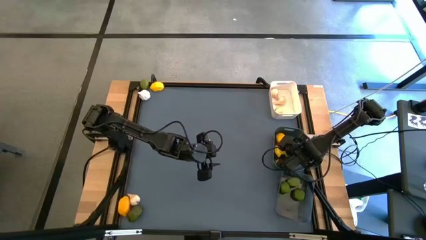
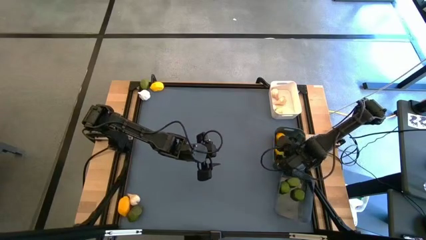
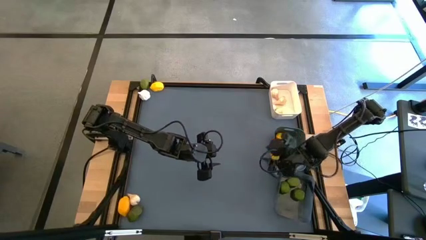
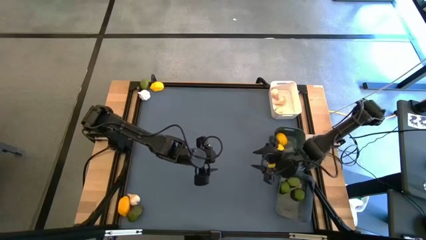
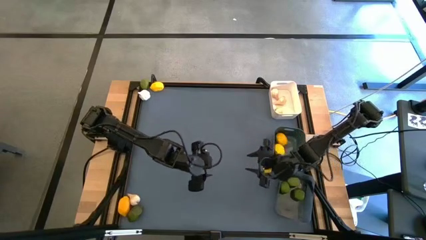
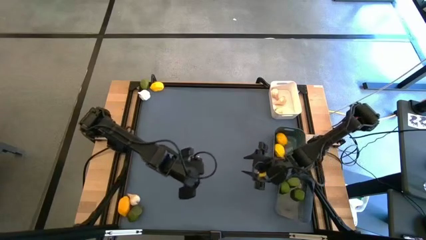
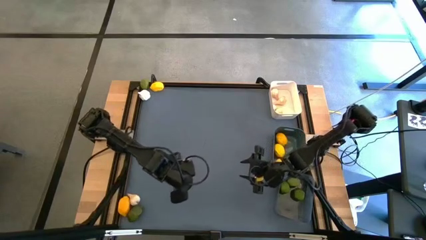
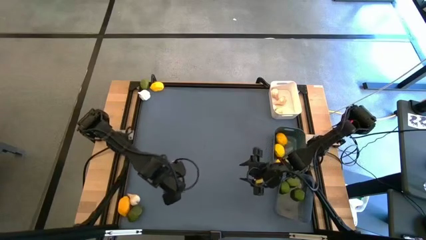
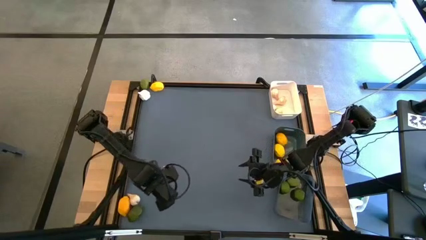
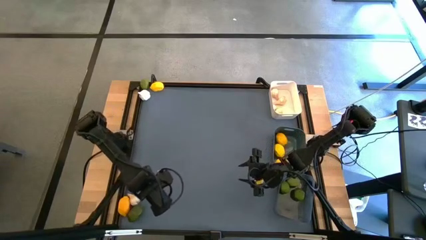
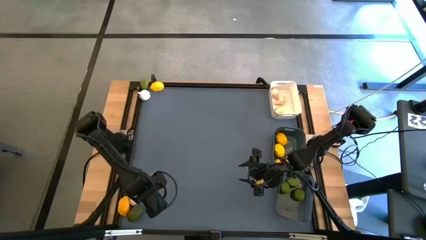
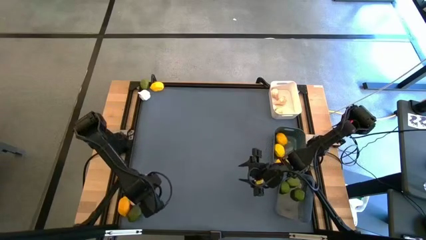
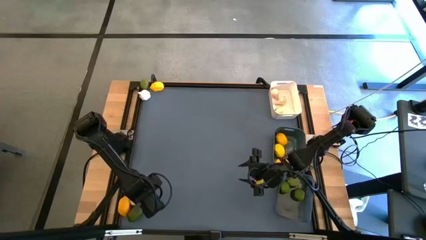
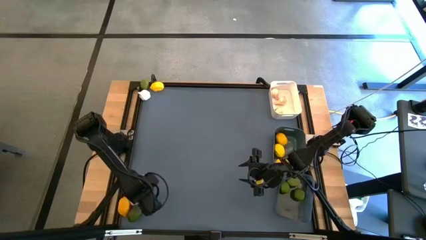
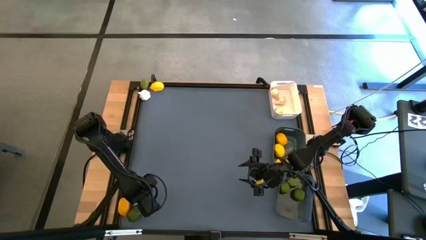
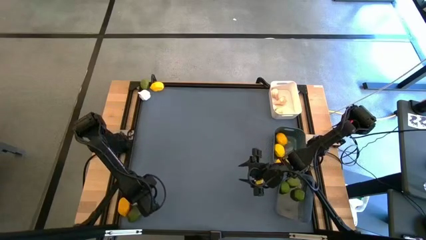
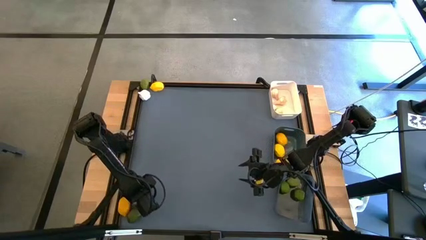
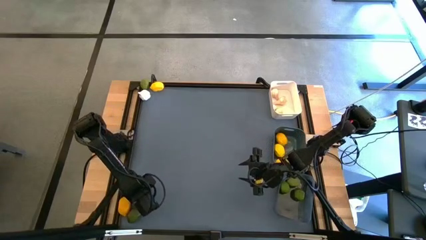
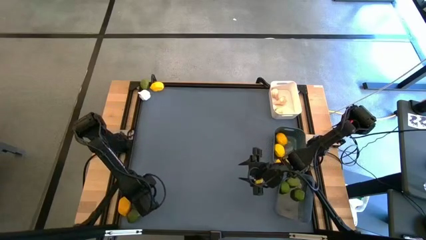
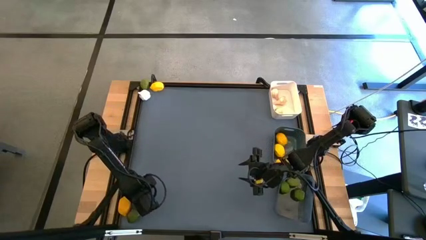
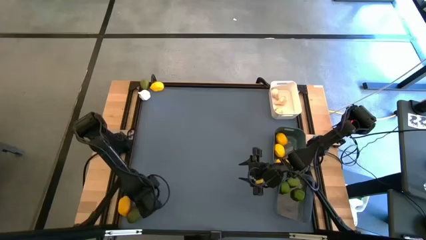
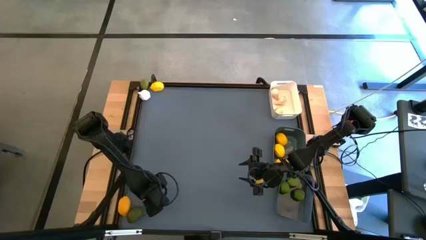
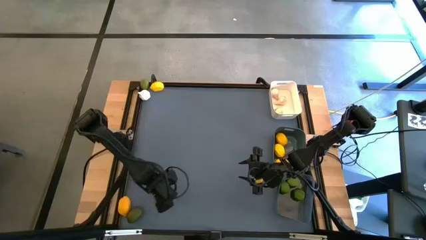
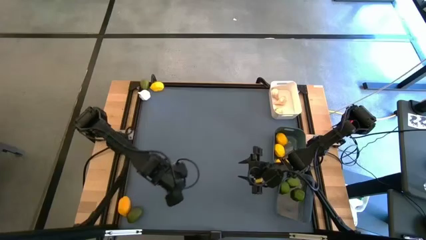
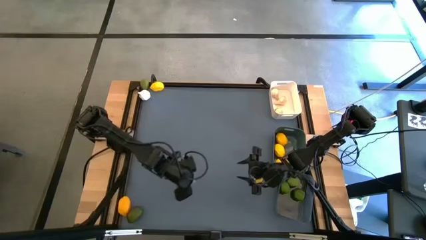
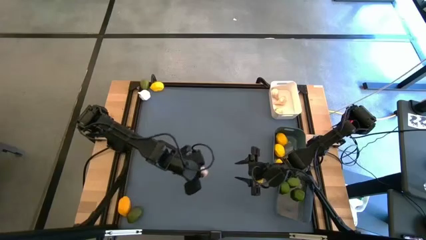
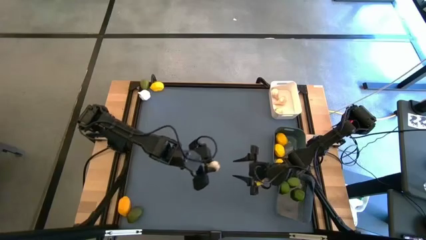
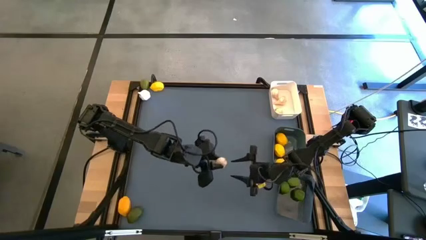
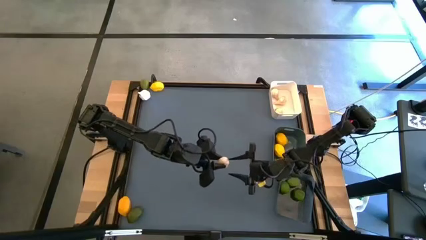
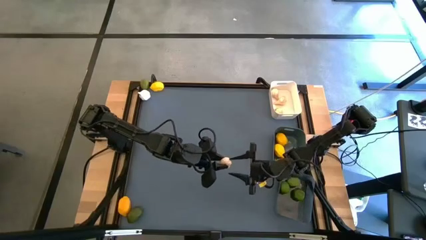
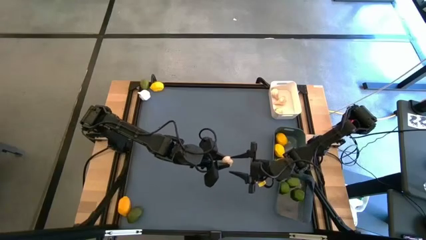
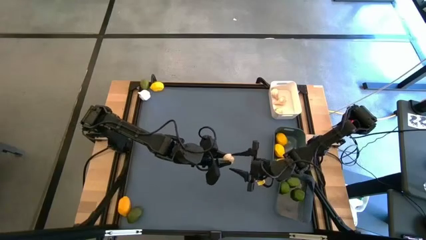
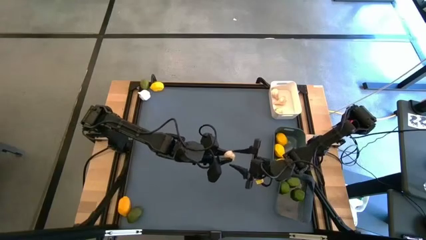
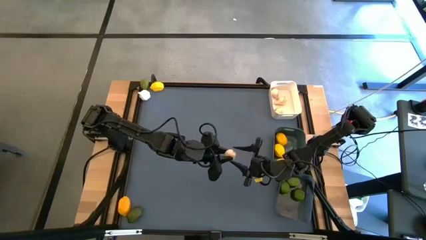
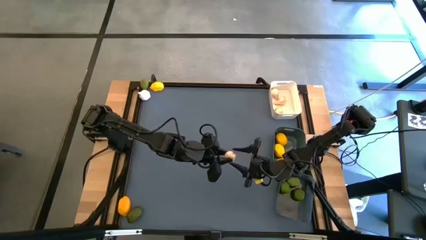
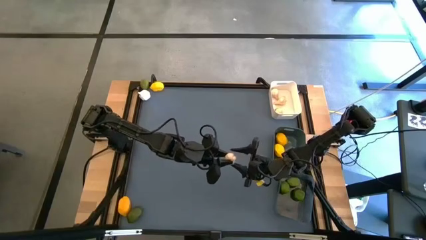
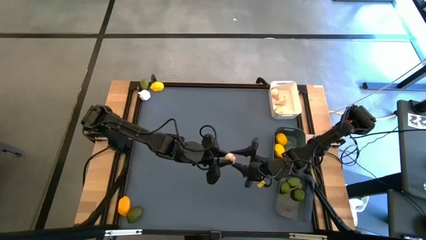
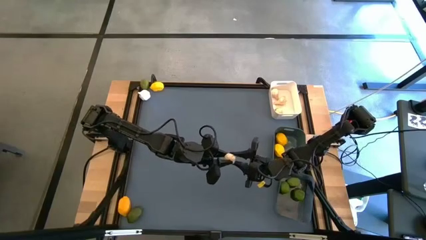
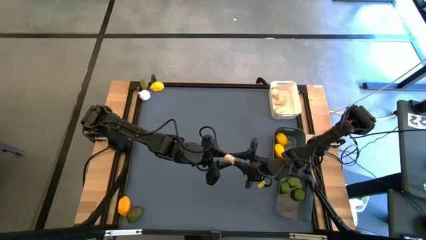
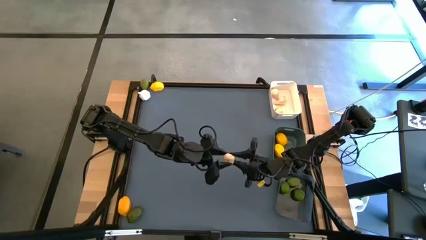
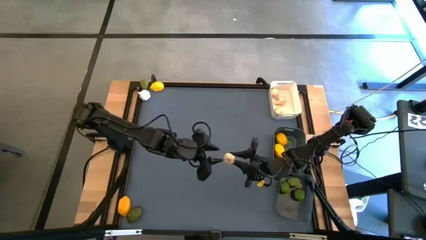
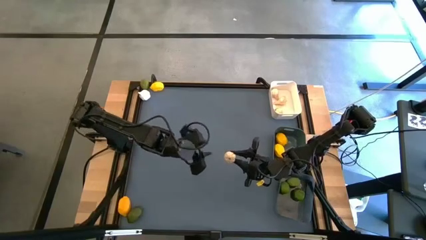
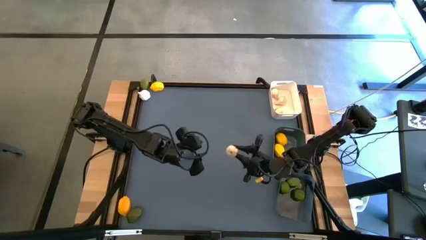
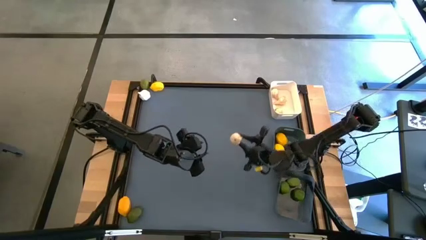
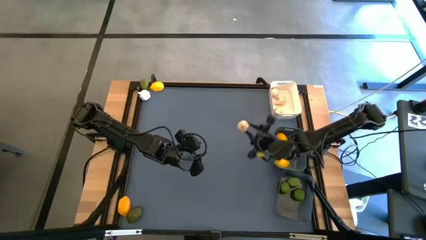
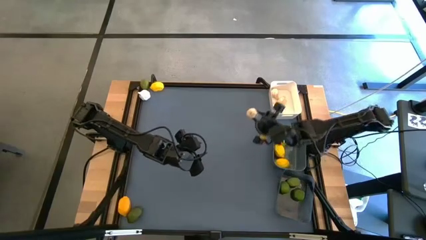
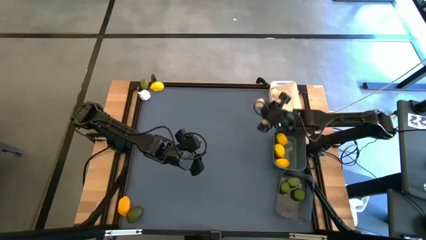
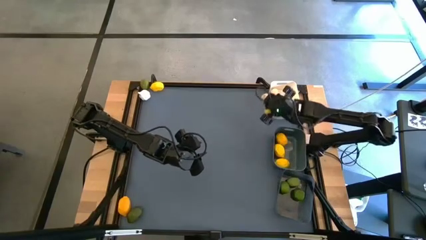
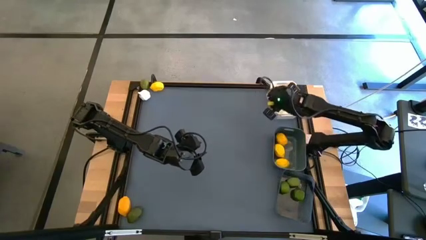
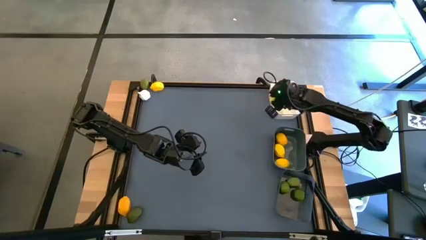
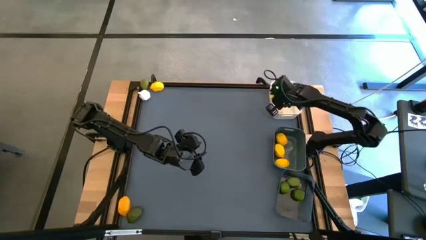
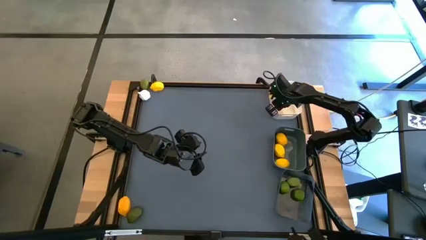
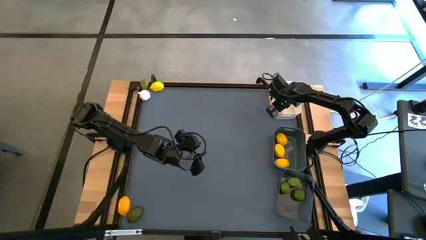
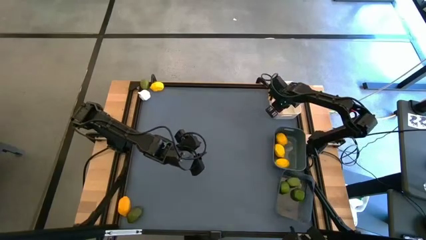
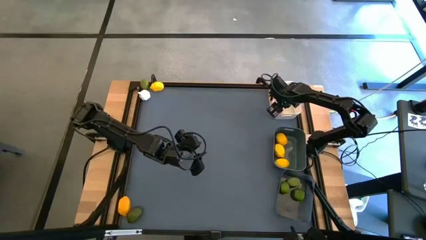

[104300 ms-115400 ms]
Task: Sort produce into baskets
Put the white garlic into the white bin

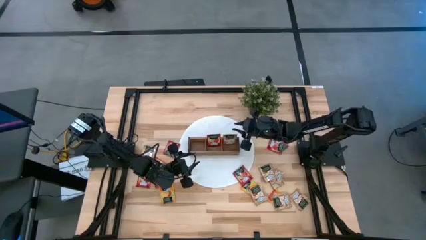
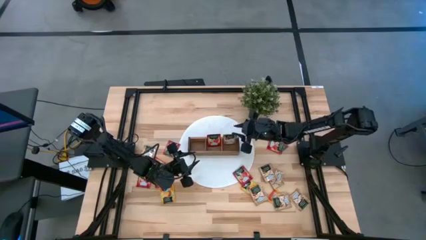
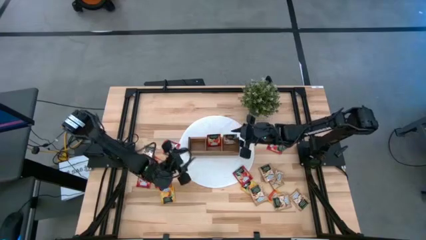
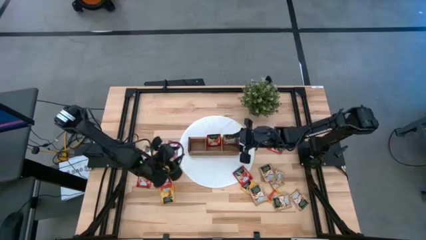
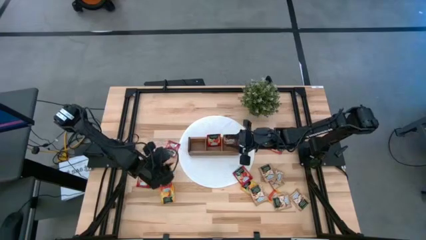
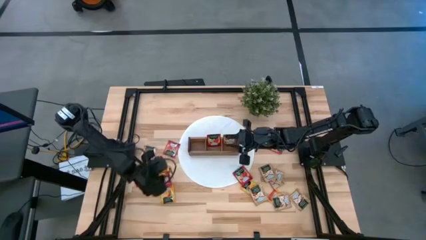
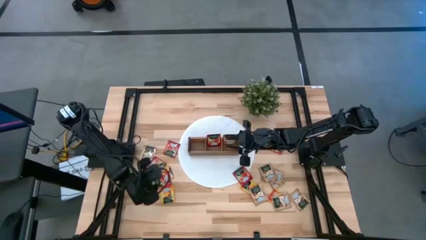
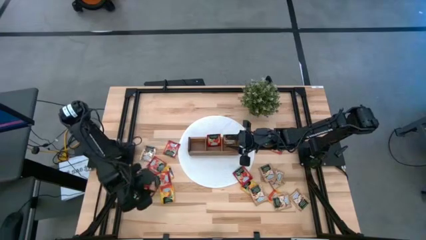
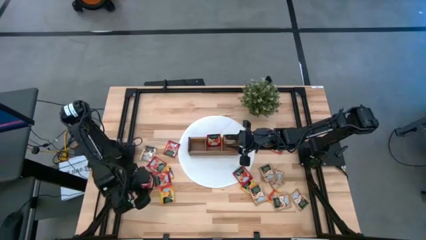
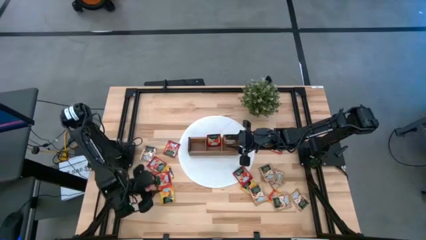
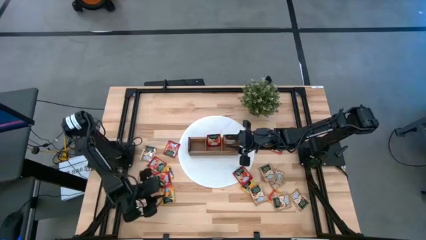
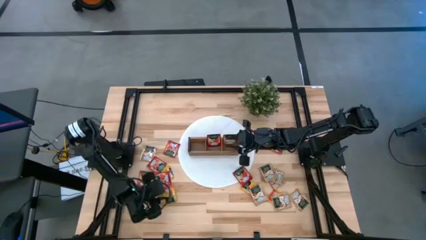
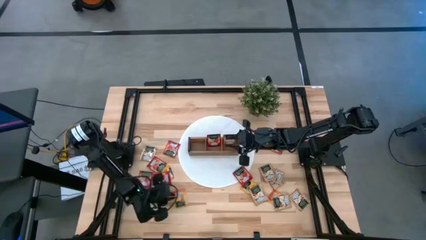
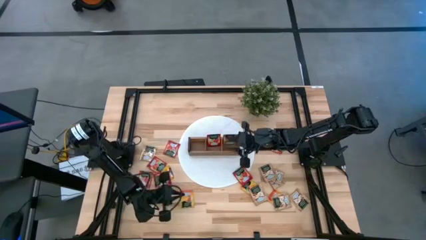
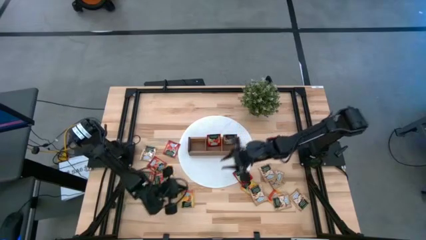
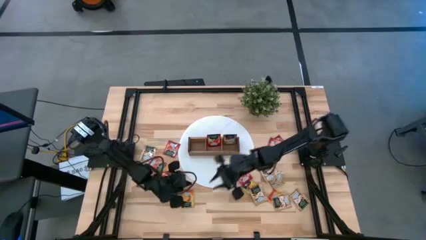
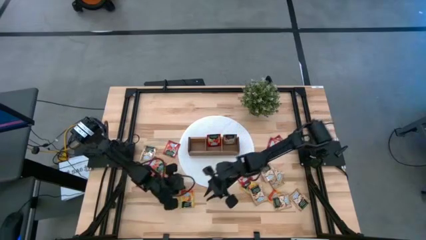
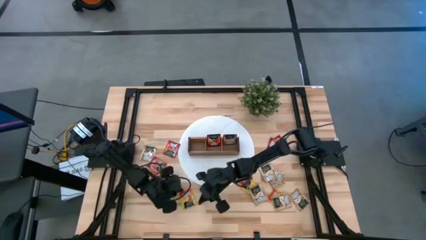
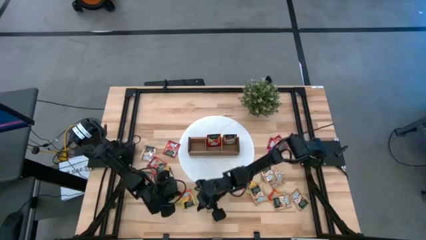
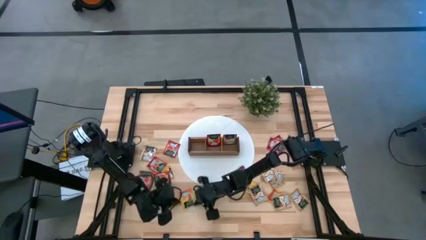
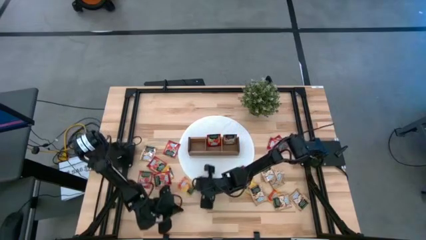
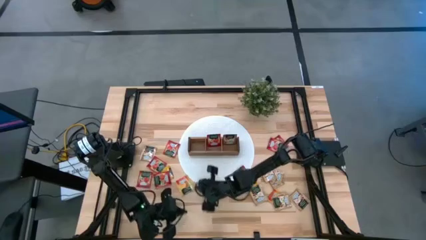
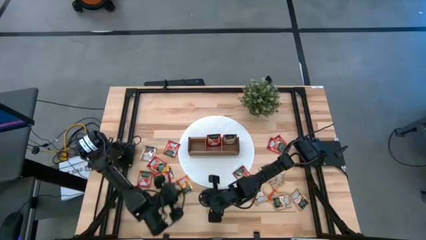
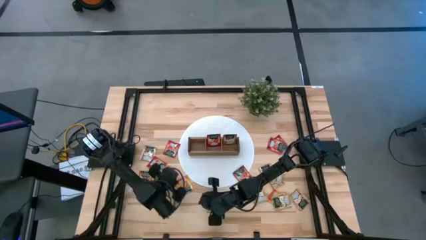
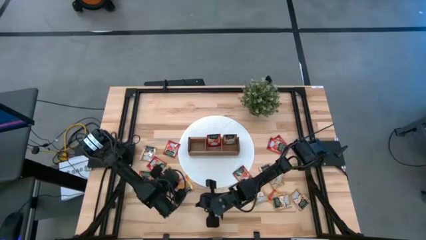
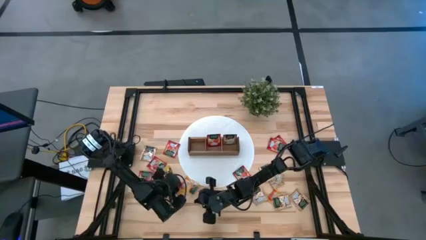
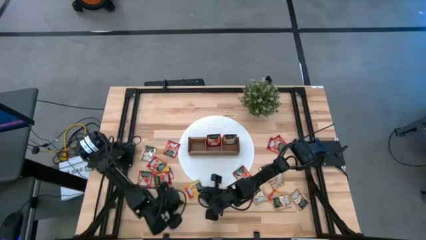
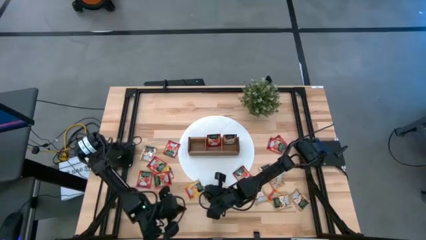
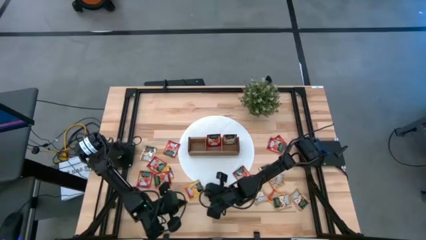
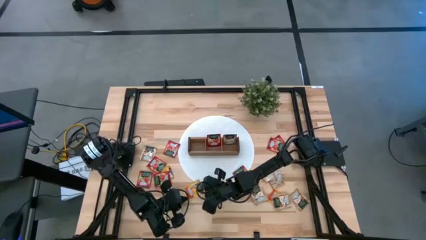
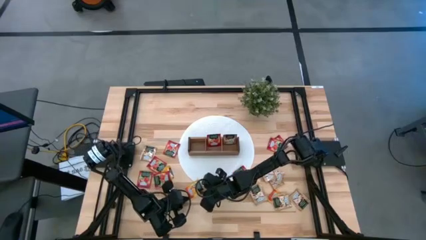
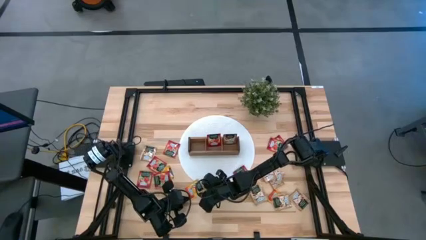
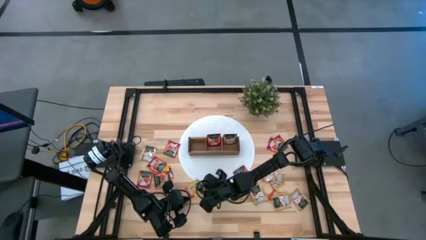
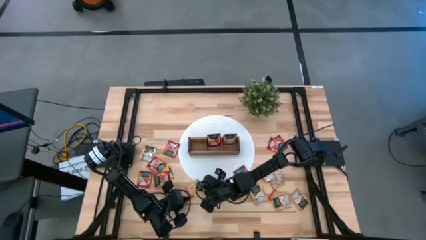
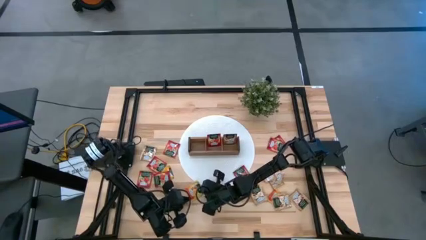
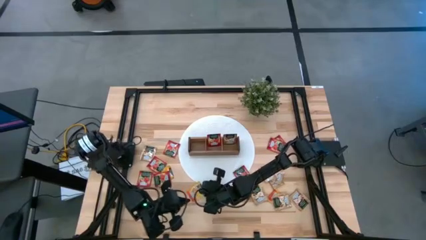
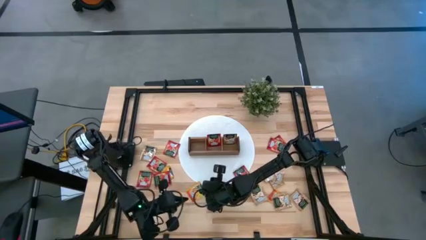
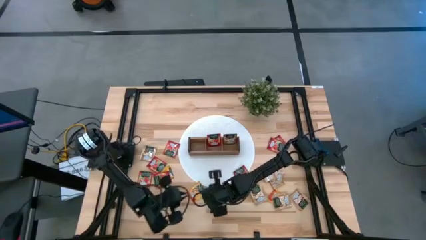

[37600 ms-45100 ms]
Task: Pick & Place Tea
Put the orange tea bag into the left section of the wooden organizer
